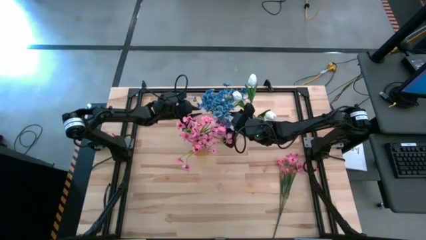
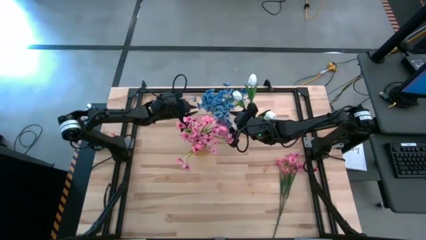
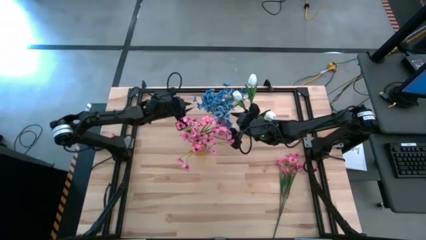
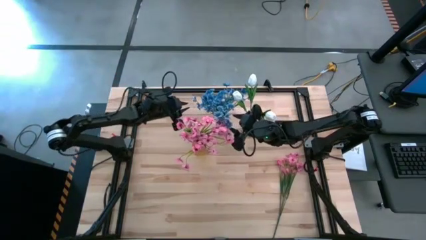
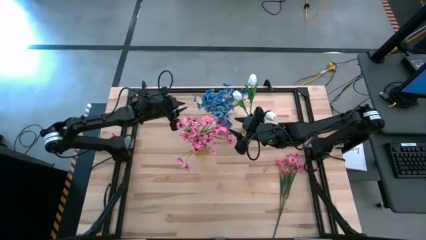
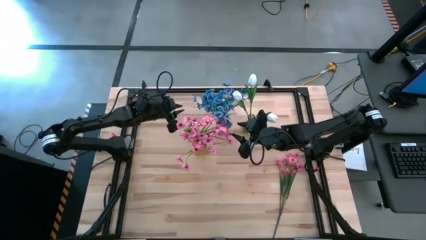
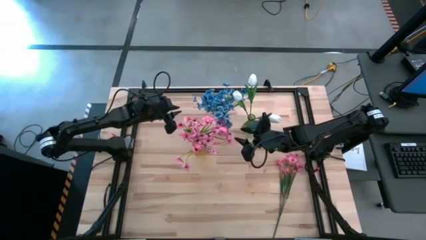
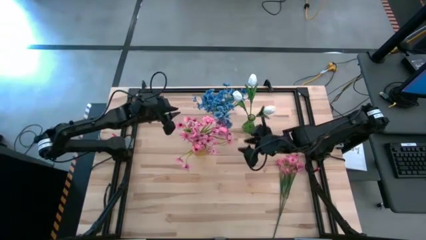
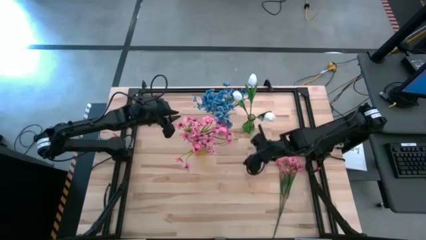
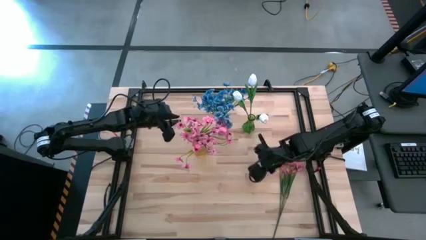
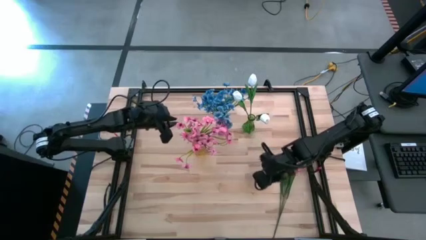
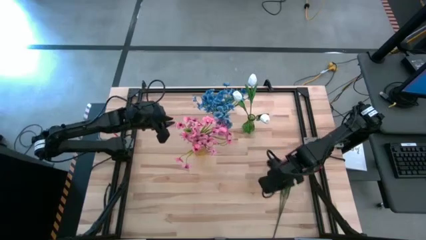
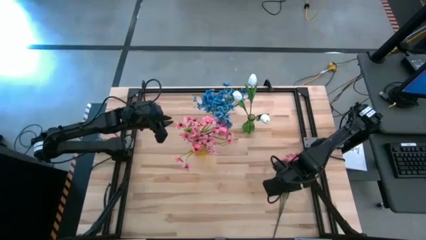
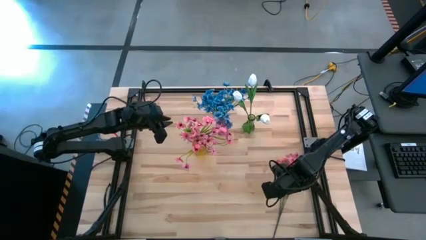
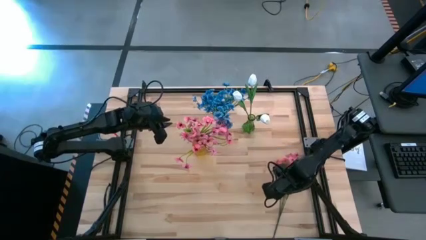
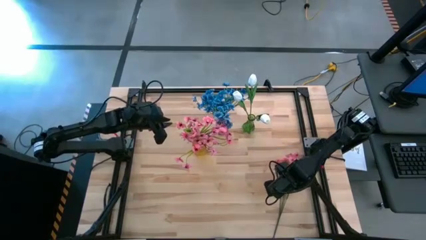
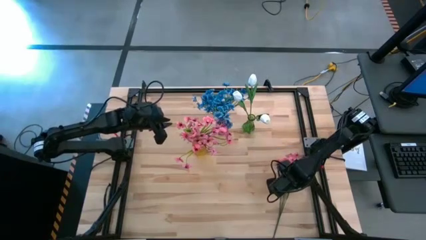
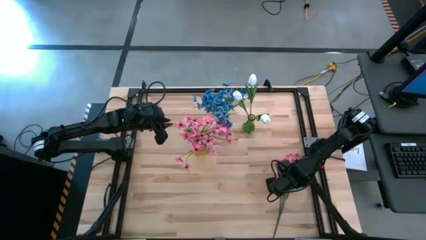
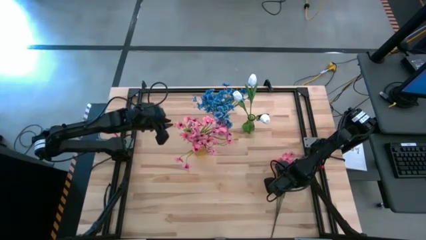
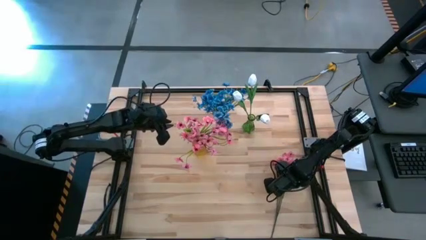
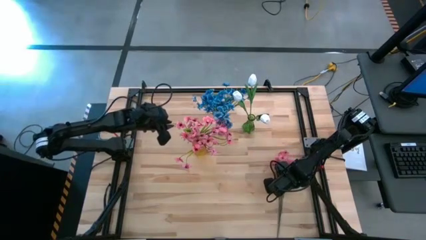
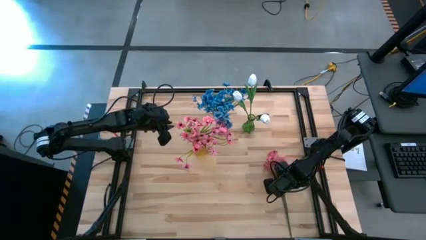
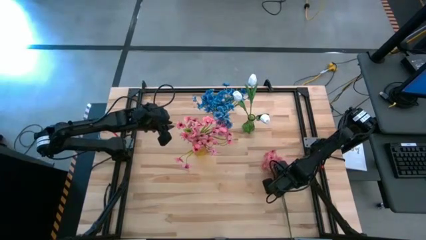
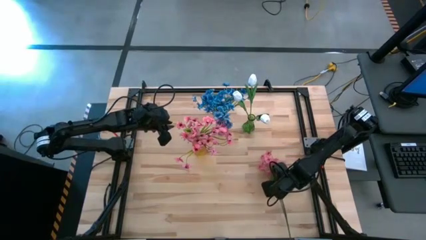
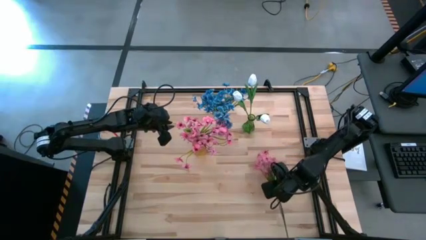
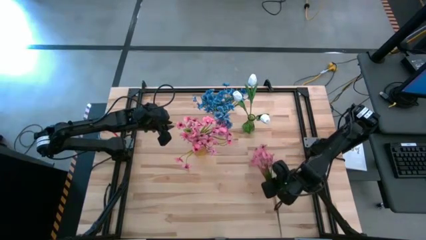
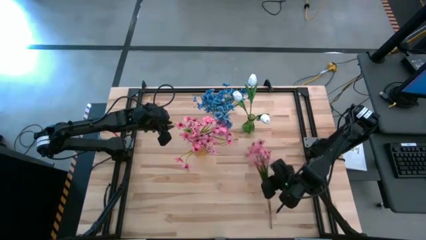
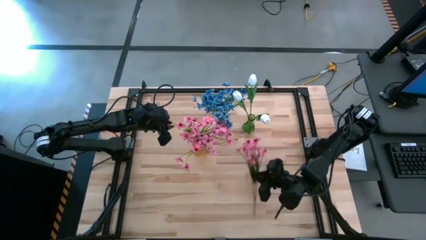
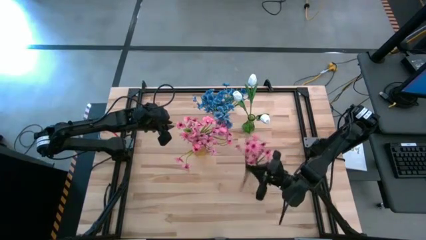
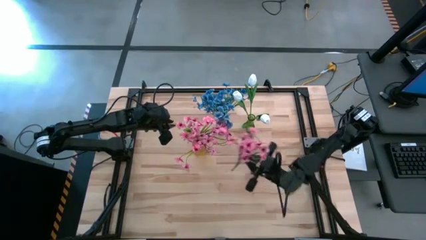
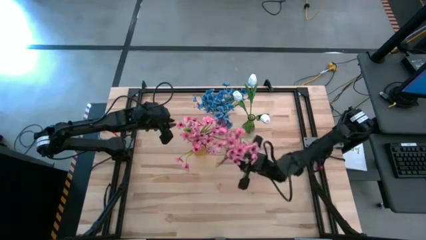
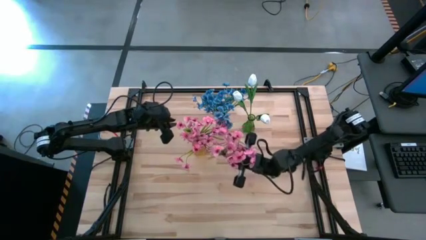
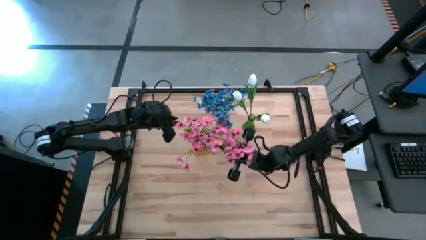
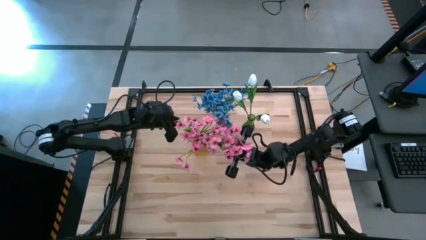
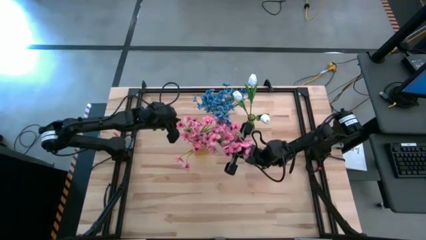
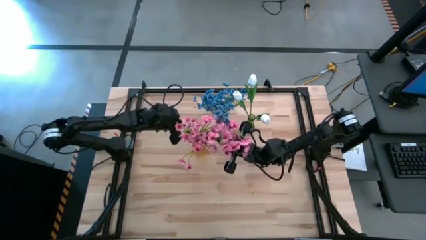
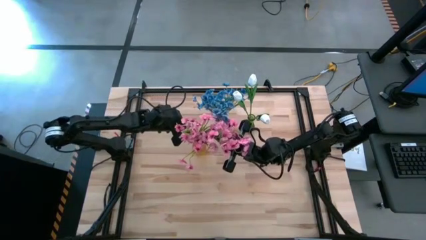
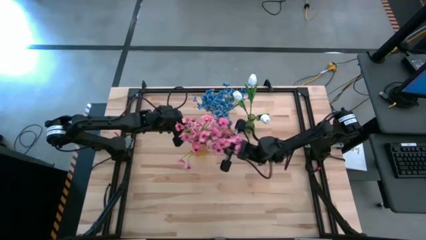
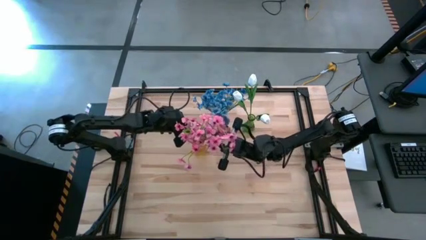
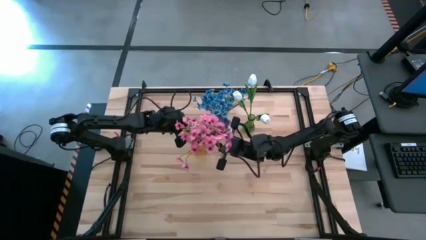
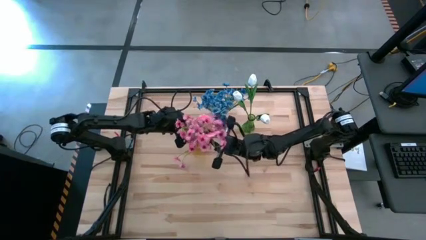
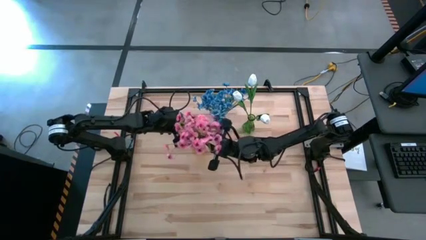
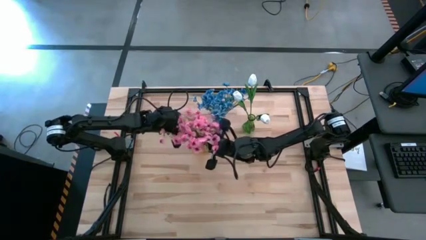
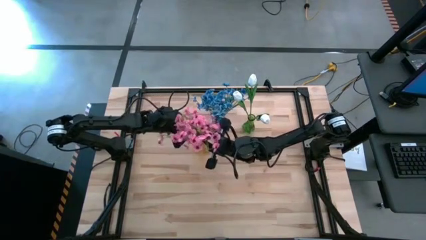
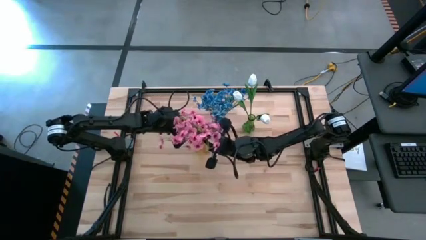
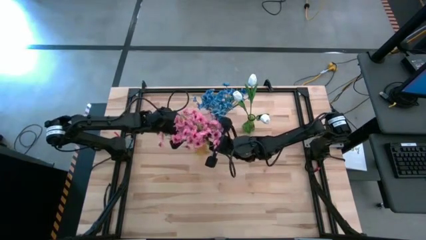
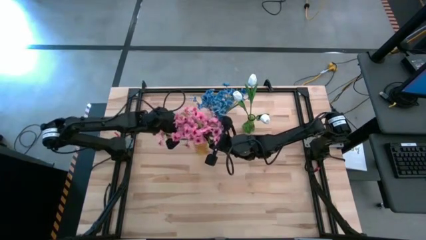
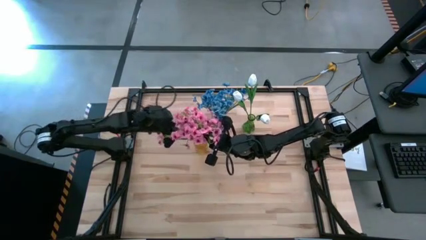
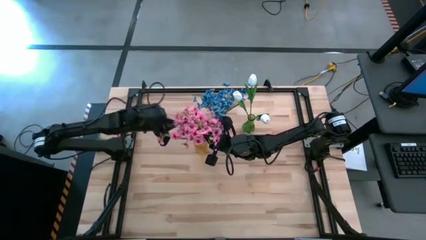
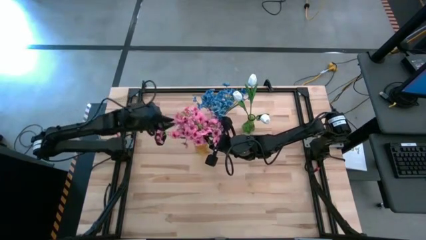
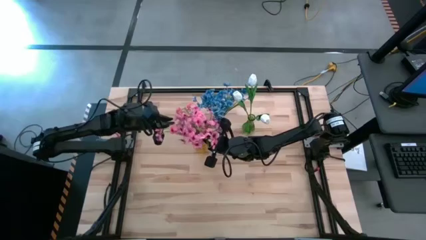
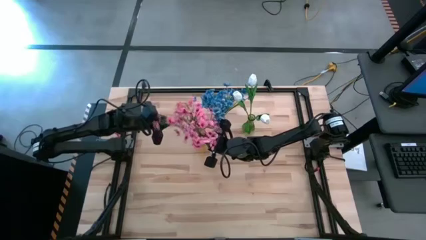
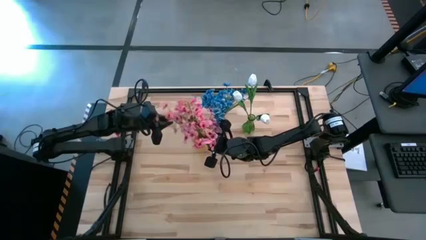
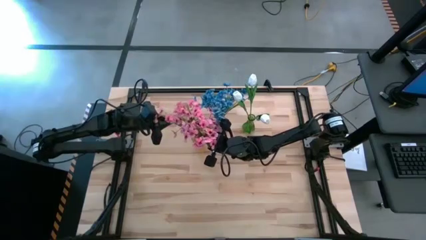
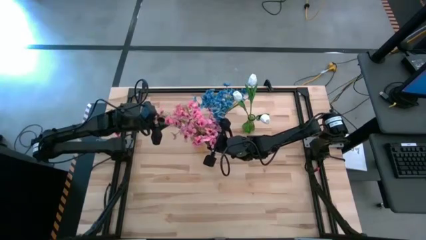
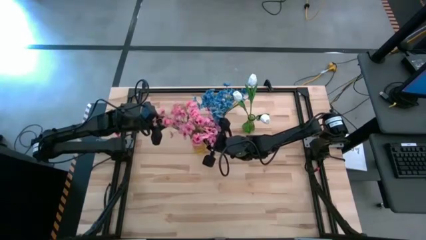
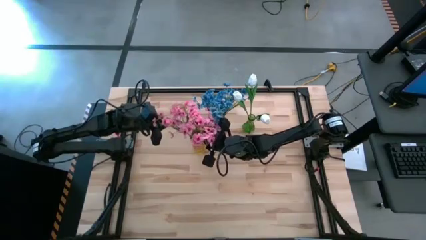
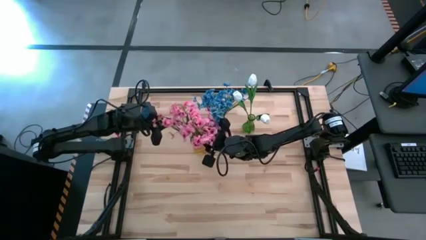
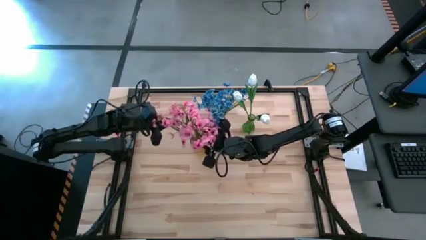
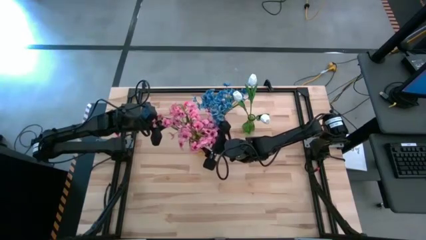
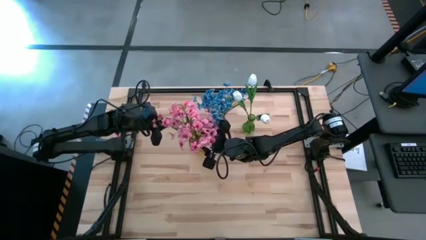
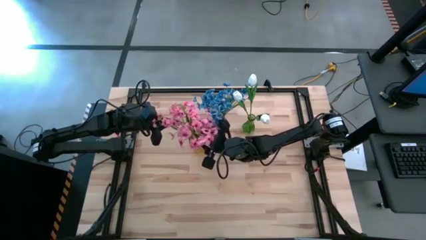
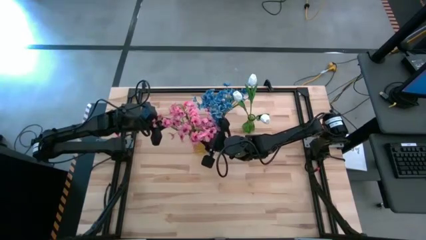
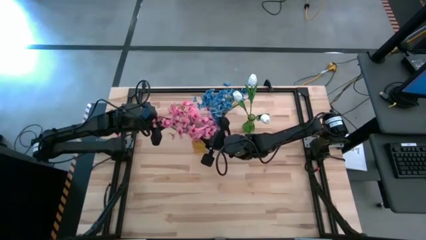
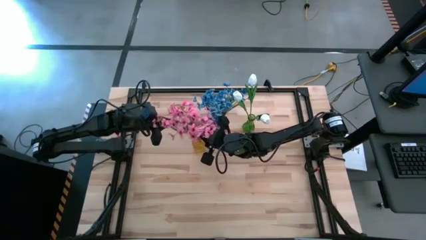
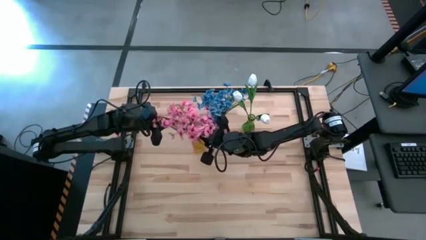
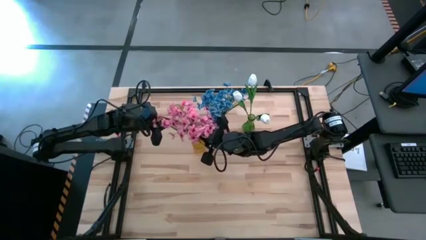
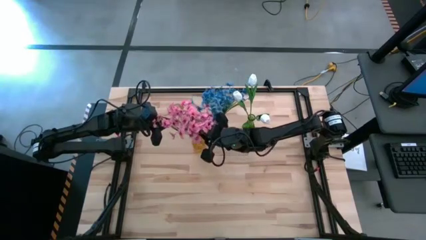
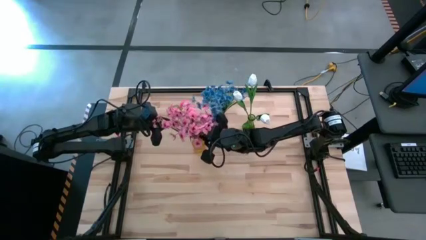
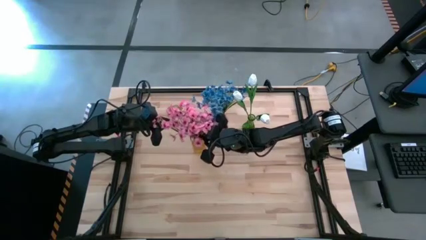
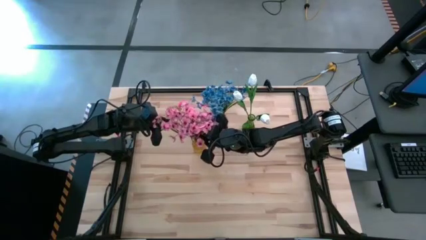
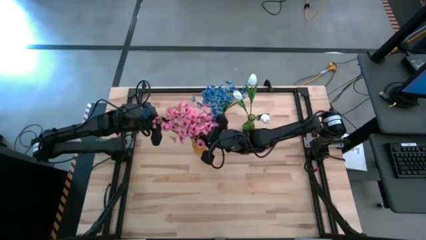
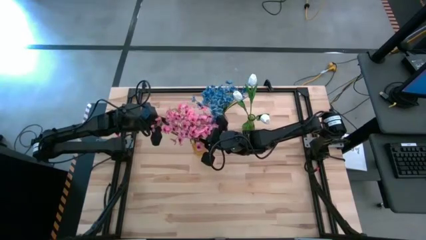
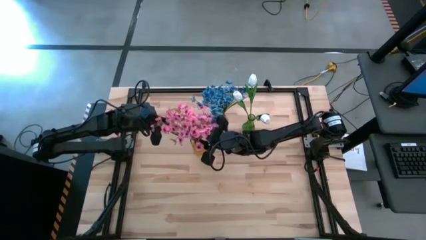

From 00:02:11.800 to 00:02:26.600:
Task: Sort flowers into vase by color
Put the pink flowers into the yellow flower vase

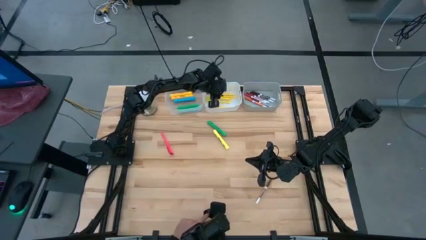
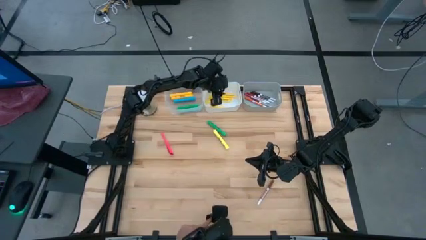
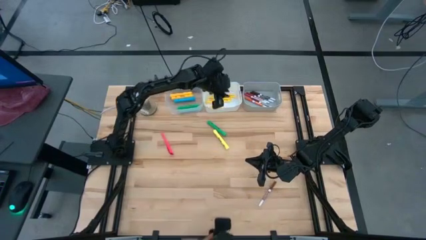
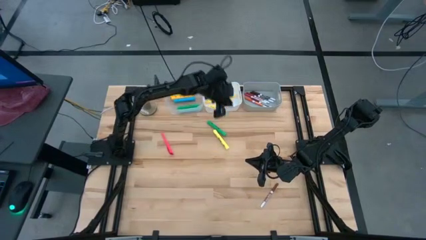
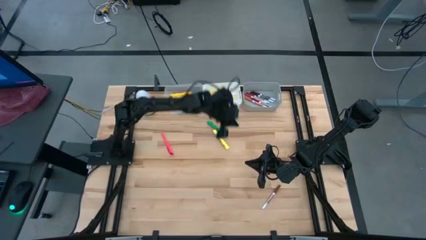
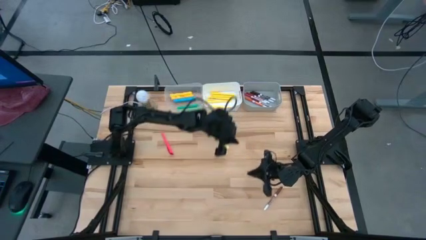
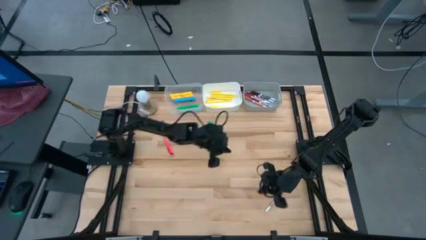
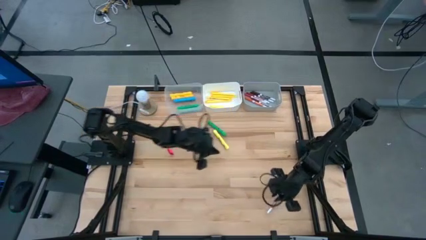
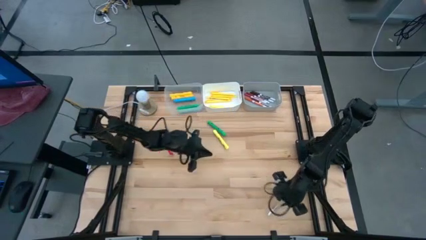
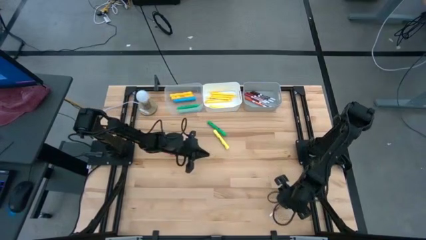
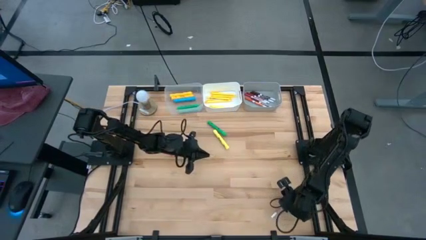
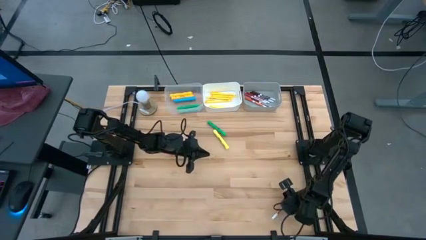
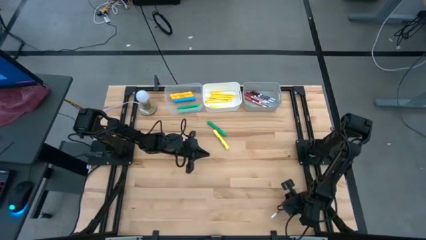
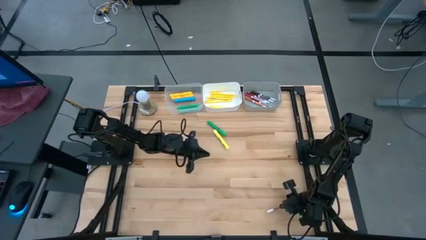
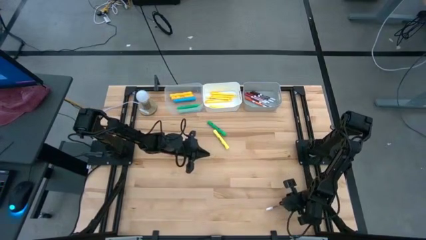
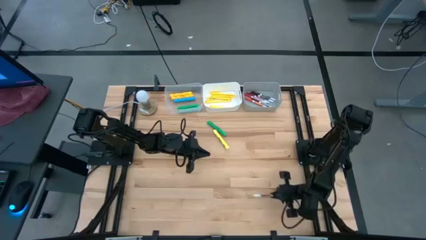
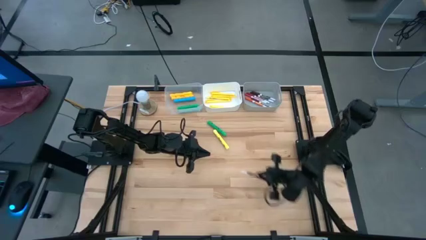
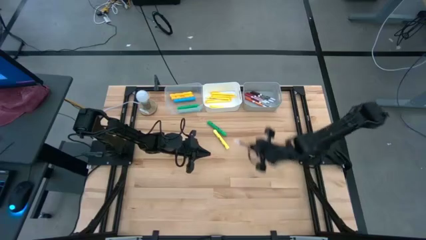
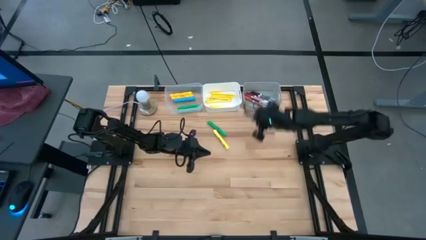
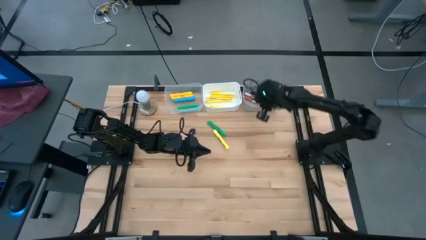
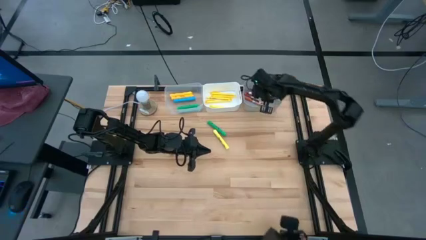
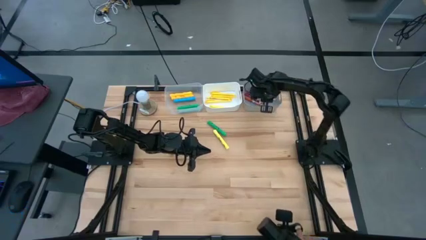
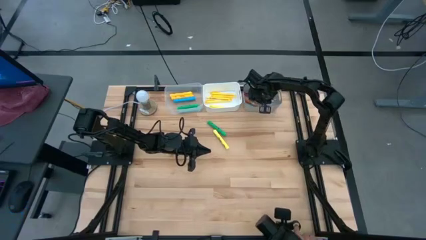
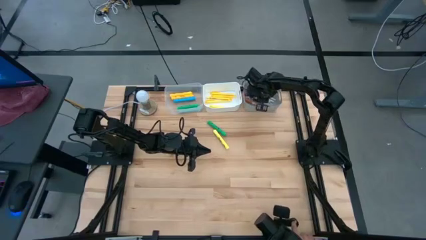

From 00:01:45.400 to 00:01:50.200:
Task: Pick & Place Markers
Put the light brown marker pen into the gray bin
